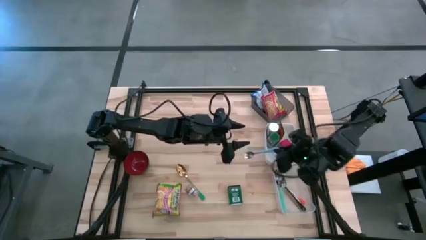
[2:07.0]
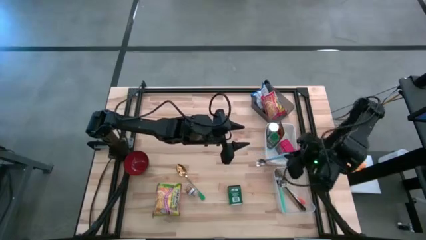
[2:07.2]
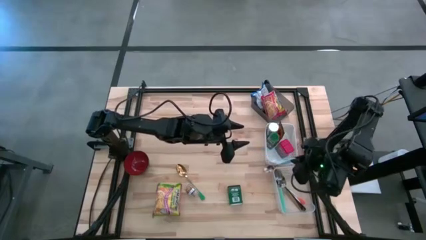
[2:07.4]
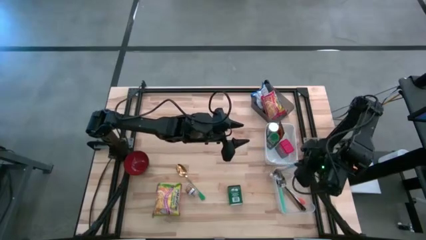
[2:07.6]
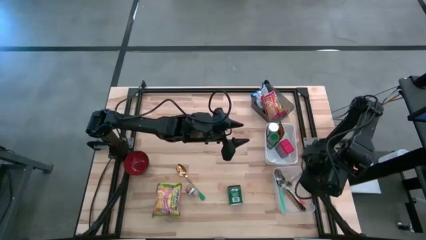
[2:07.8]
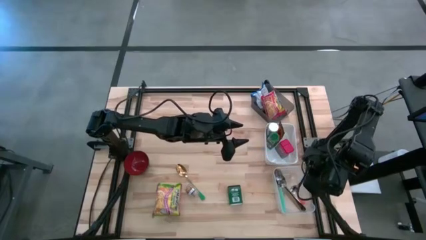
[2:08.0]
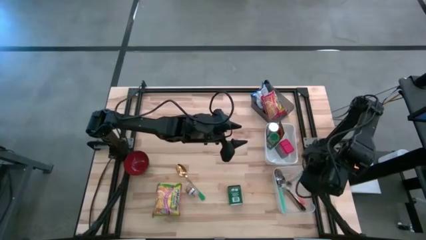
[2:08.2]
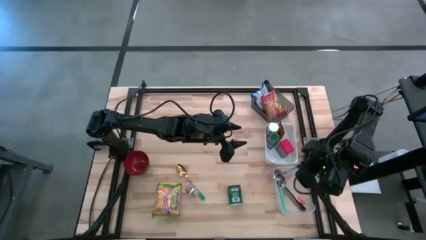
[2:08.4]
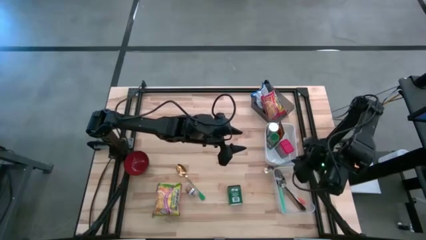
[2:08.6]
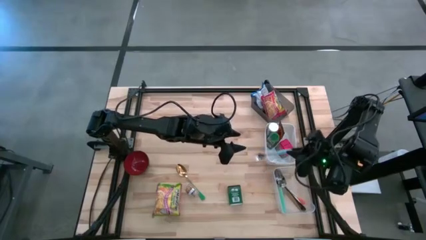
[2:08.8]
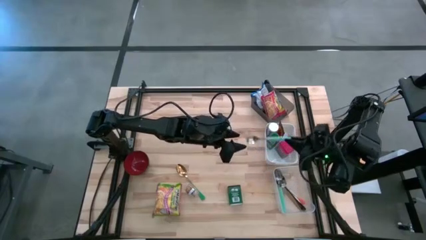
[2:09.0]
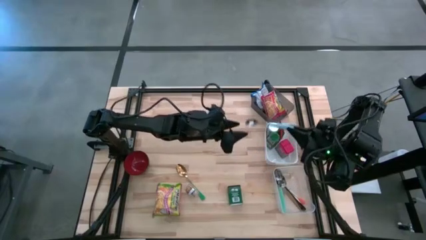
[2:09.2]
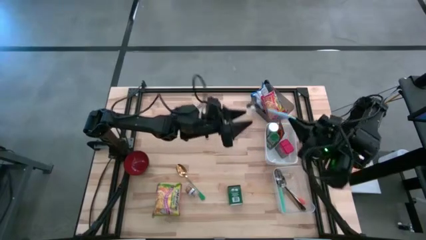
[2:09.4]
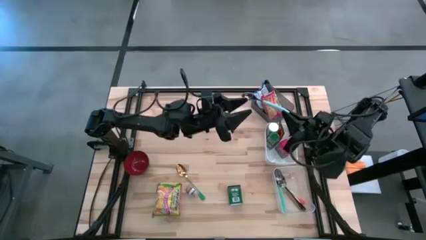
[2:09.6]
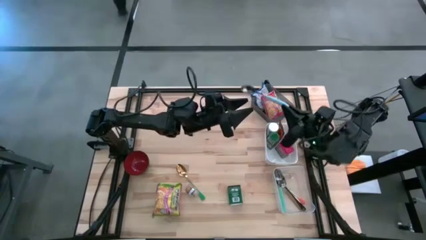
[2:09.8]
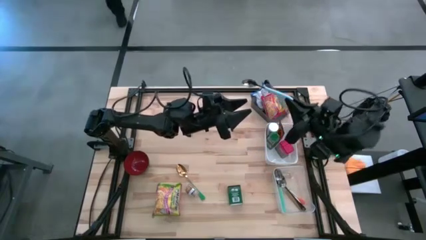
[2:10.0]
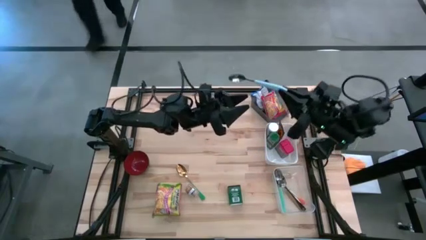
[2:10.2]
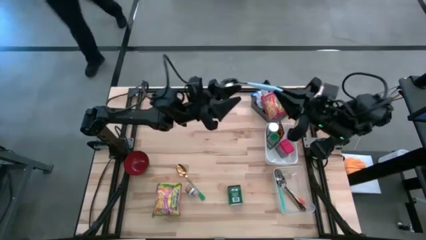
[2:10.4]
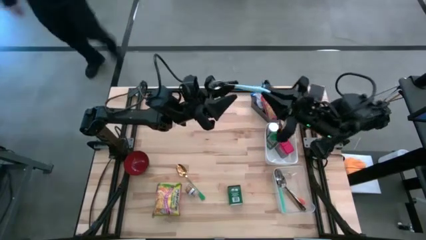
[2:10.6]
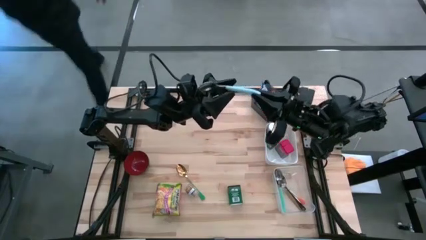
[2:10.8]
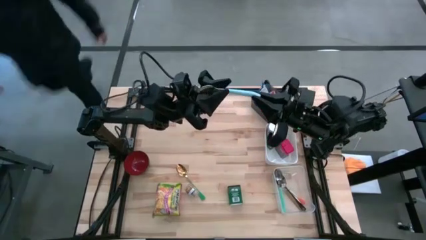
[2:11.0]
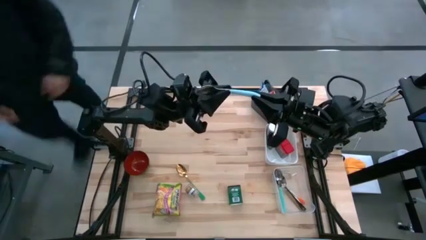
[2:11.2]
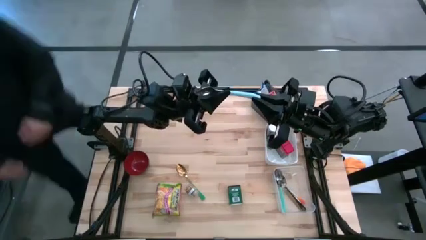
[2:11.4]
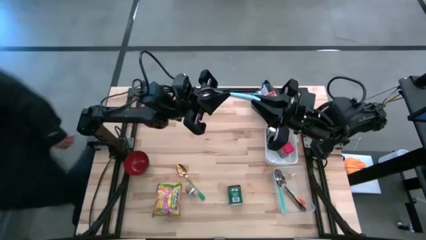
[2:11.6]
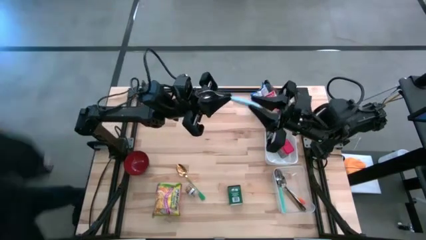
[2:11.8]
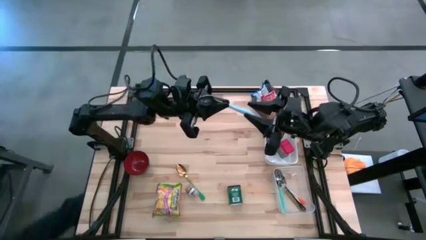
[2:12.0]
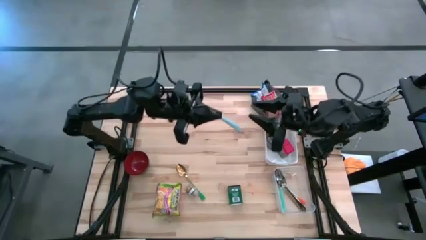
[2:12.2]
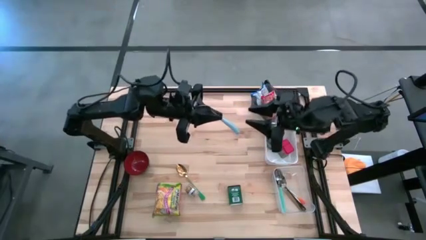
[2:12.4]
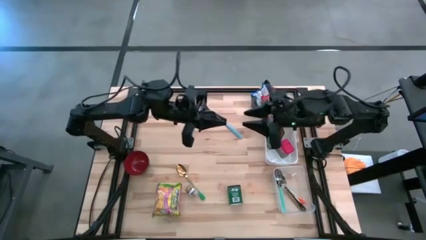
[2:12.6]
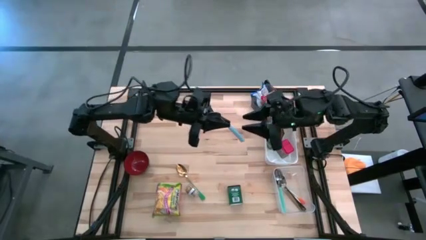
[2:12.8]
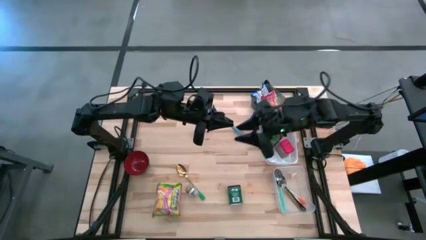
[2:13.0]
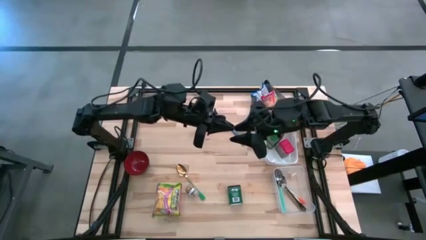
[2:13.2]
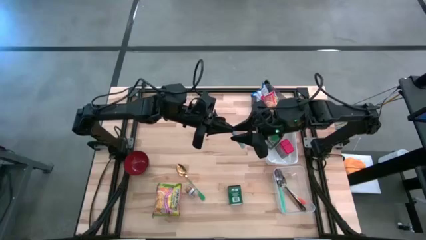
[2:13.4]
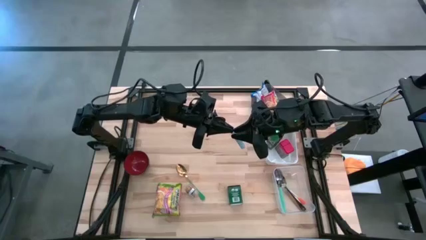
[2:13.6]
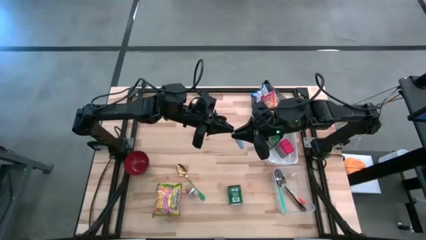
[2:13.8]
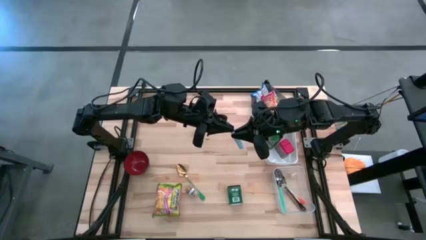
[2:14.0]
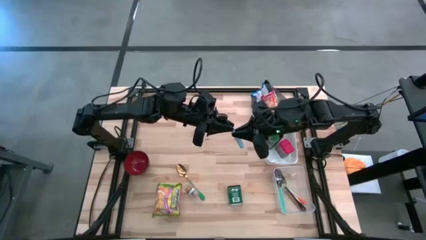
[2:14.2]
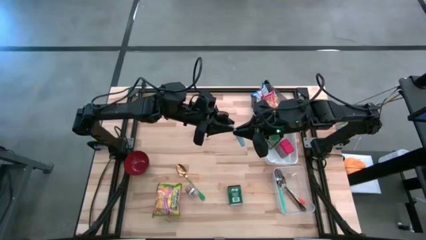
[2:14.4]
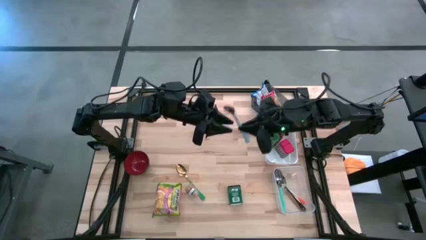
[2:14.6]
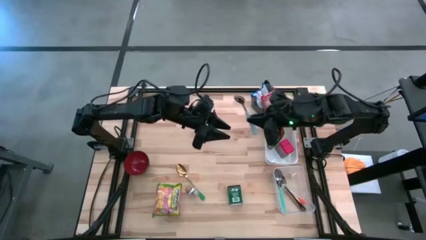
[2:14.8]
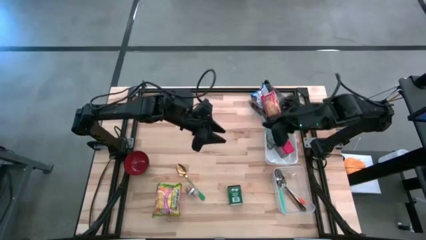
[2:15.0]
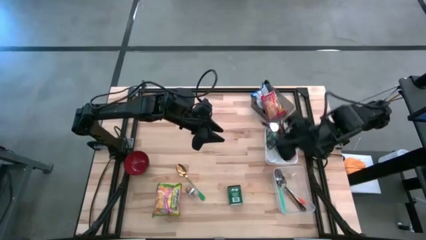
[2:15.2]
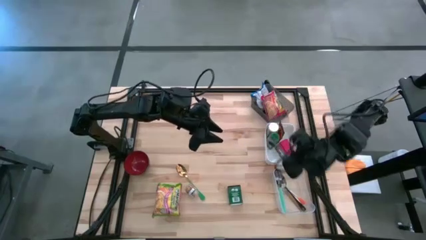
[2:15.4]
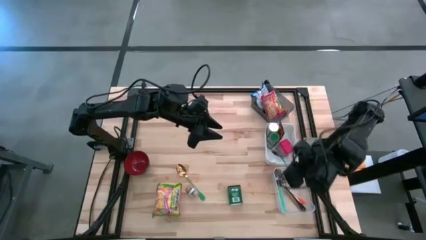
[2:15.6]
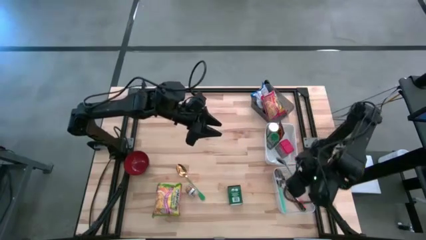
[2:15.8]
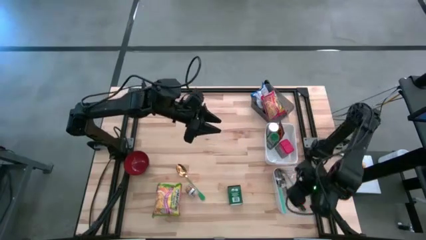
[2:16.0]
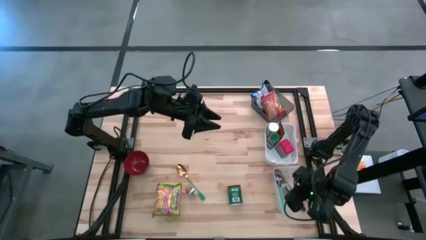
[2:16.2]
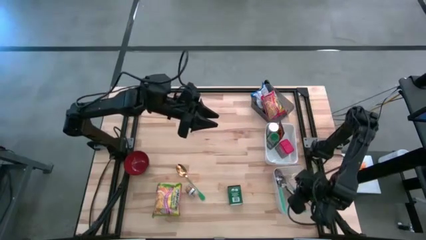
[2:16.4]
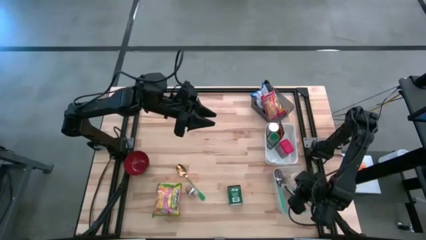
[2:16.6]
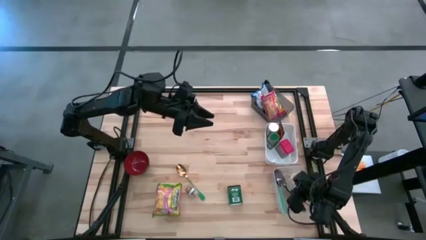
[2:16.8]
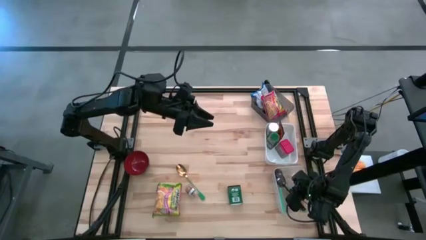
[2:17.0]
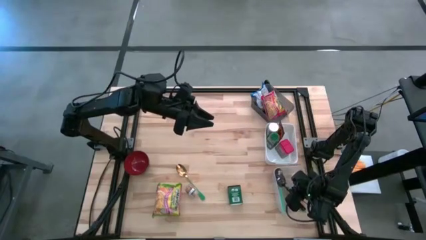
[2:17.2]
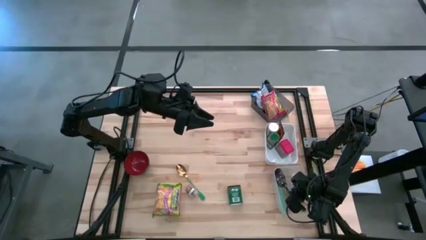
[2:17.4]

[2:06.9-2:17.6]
Put the blue spoon into the transparent bin
